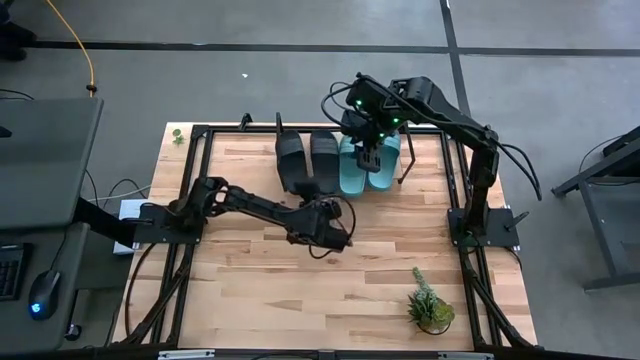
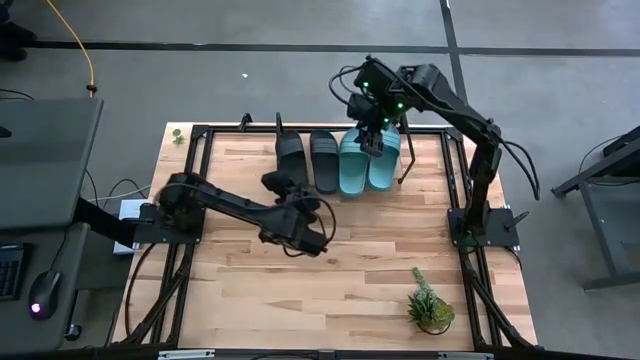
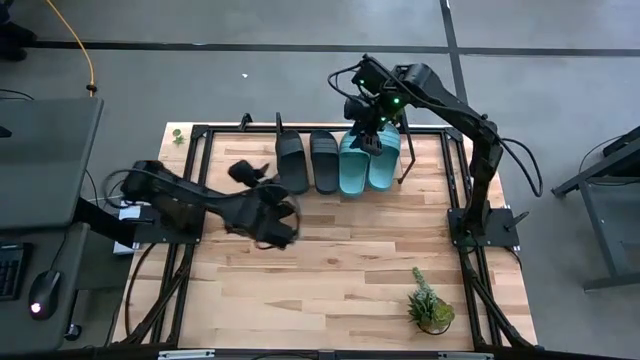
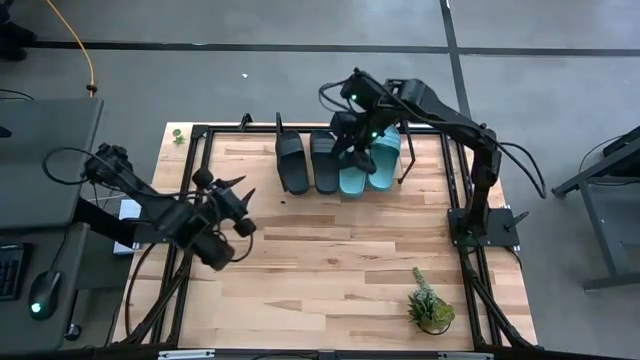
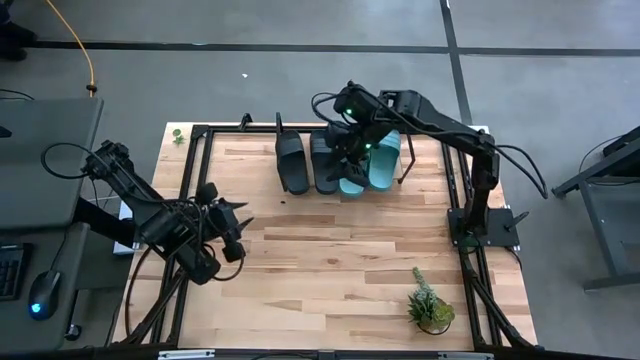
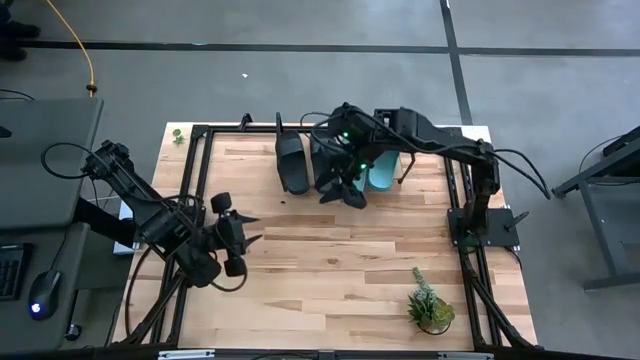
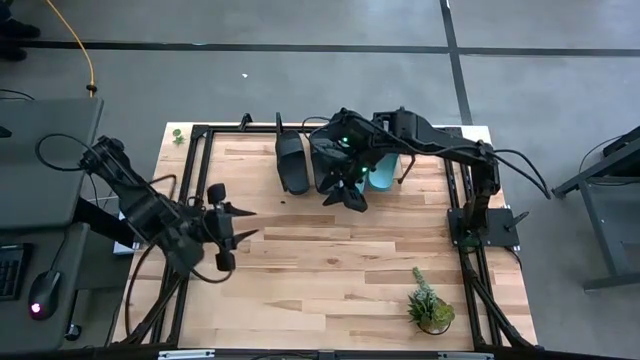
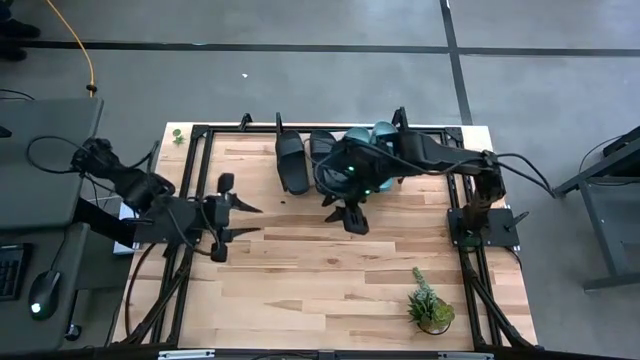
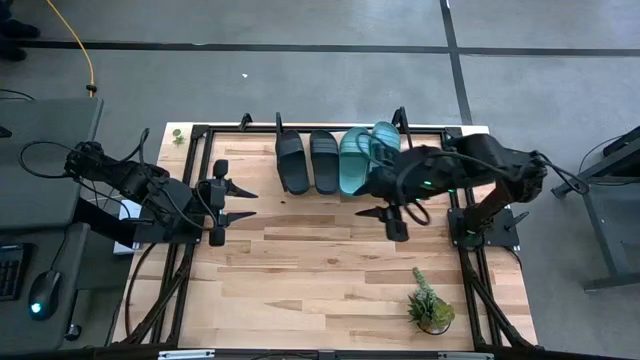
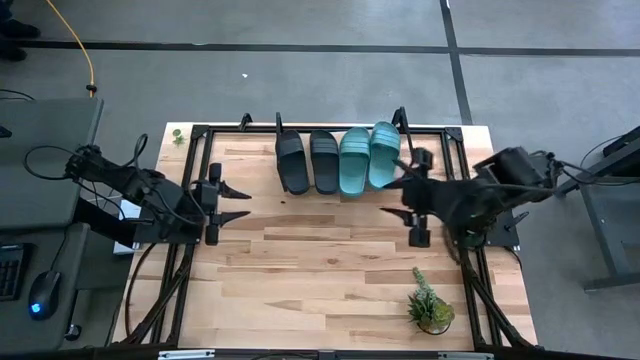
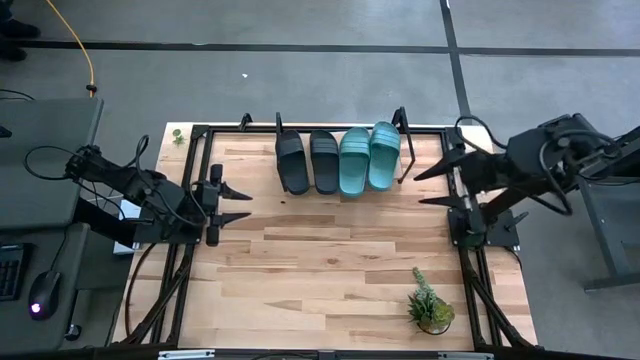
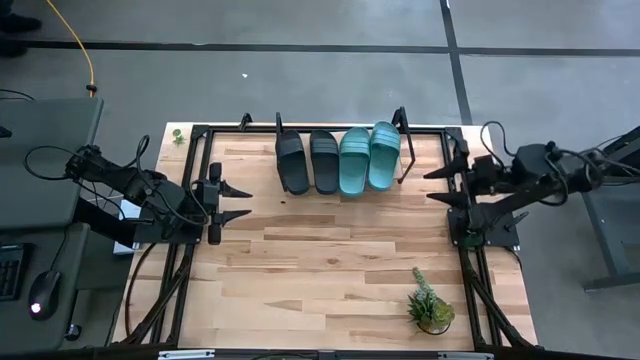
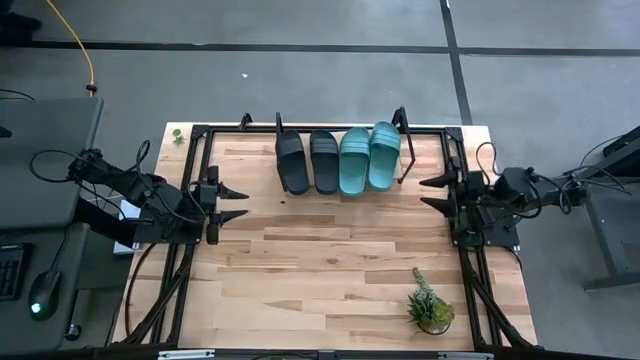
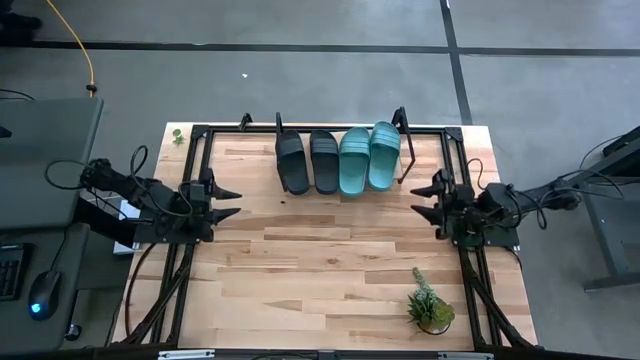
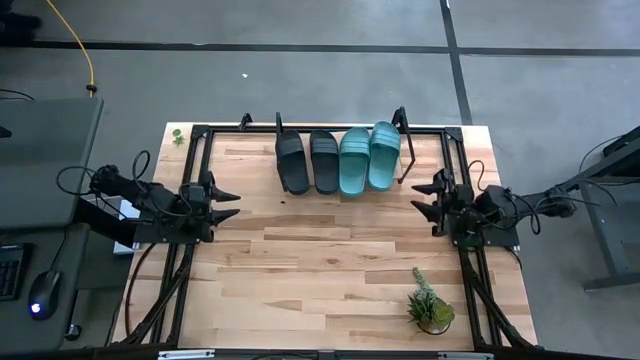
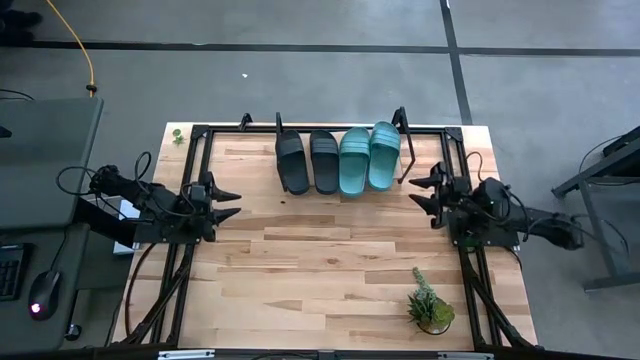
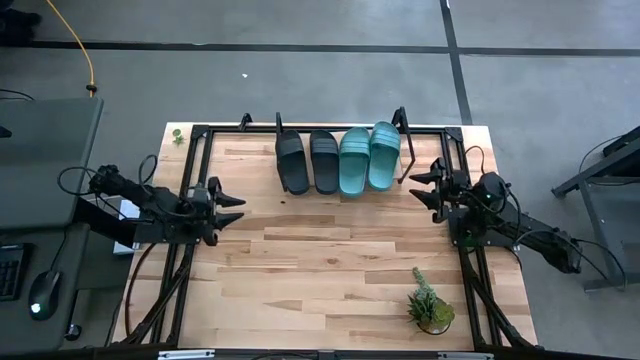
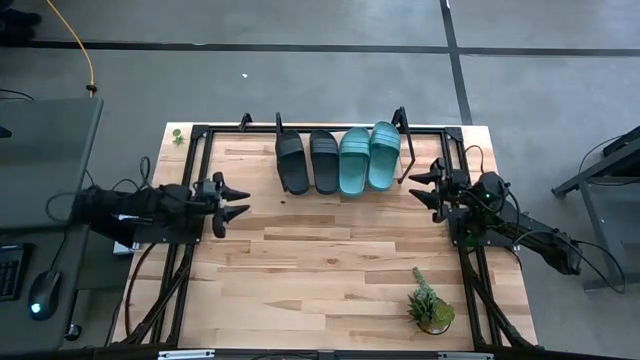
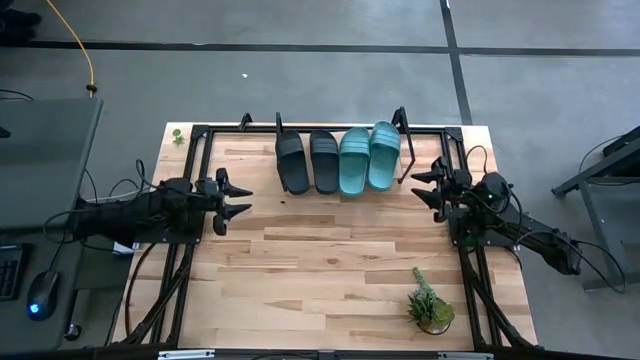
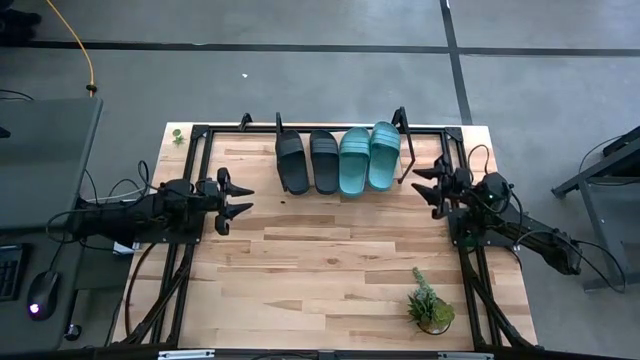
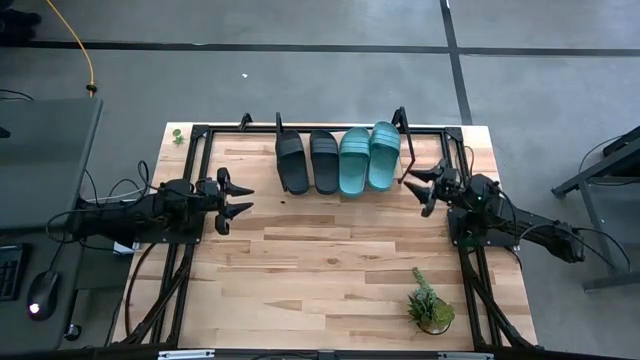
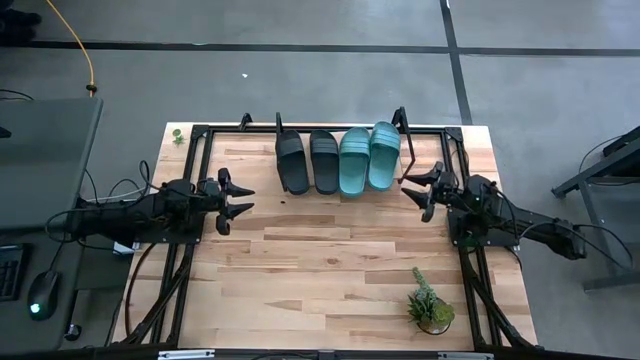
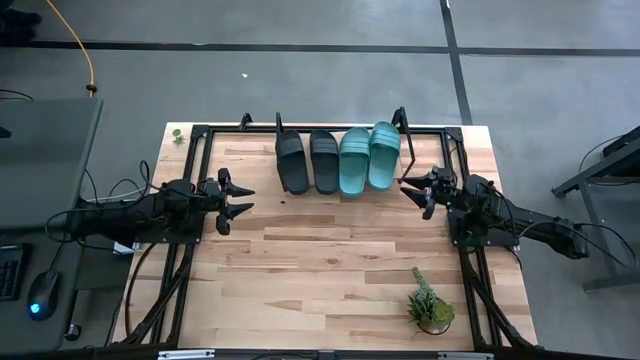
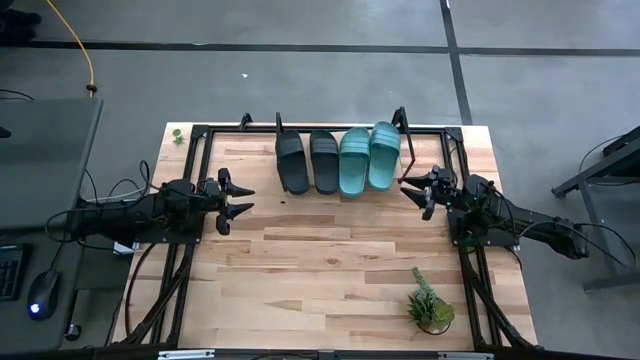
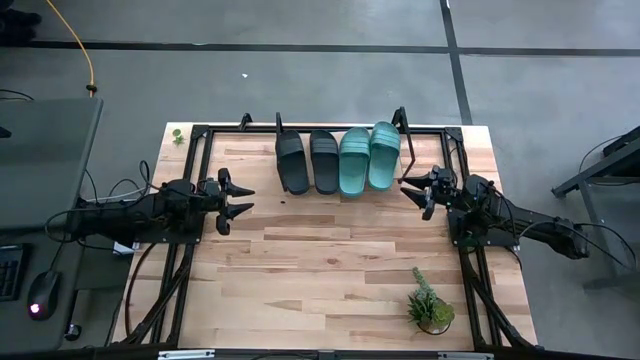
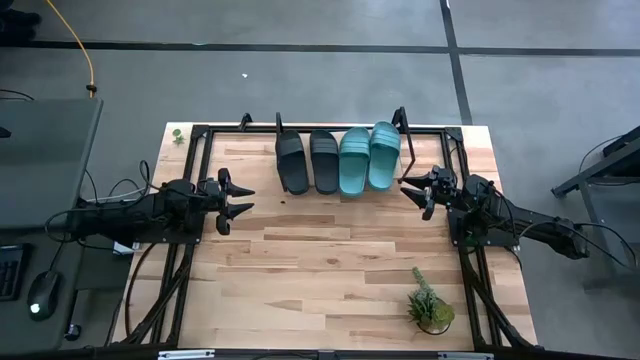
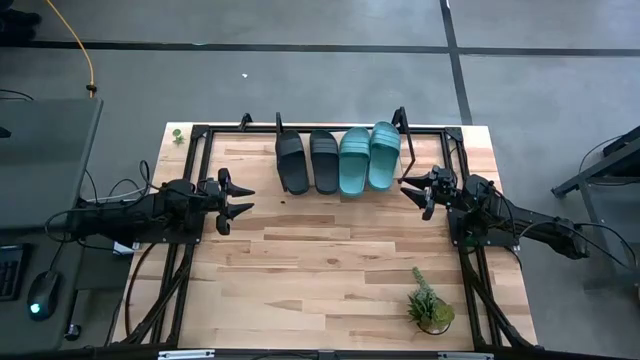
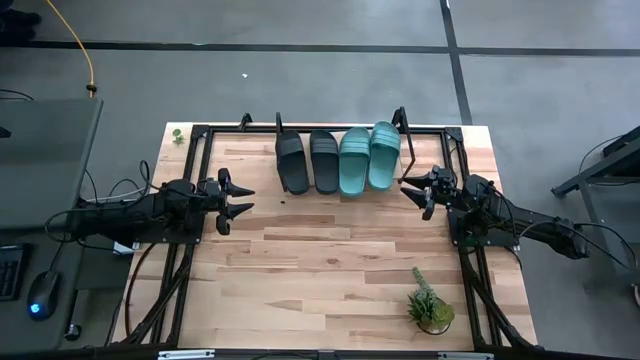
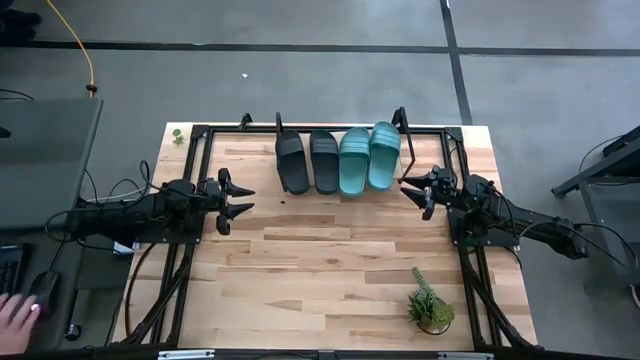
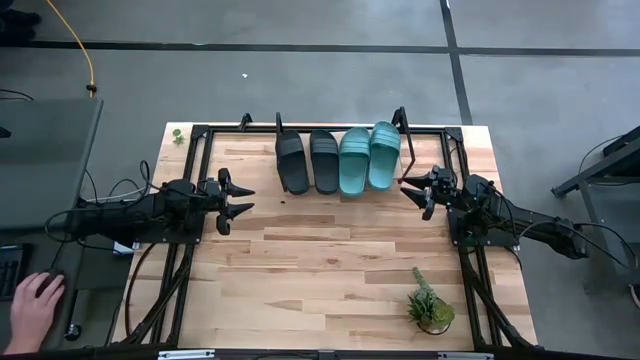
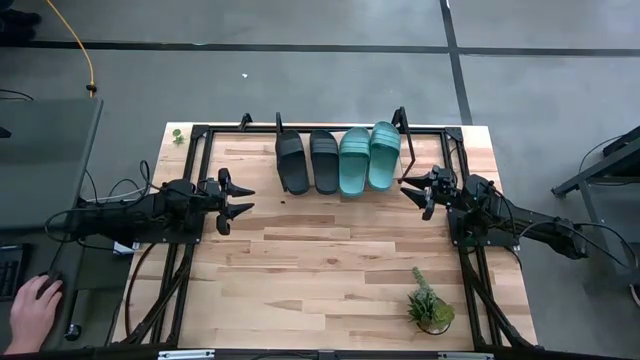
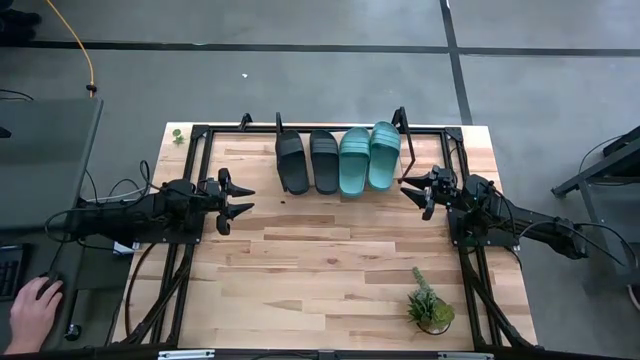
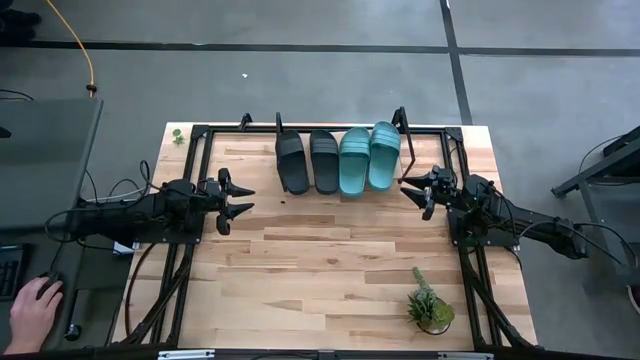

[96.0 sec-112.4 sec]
Task: Pick and place slides into the shelf
Return to Home Position

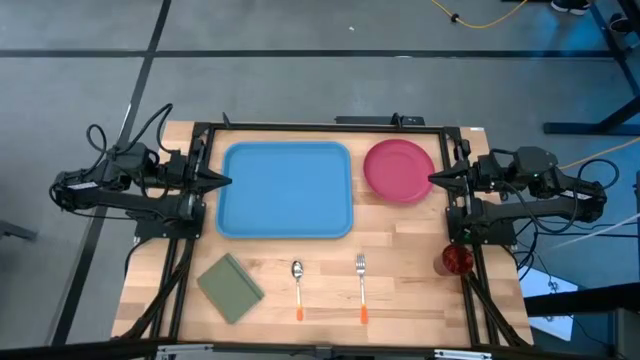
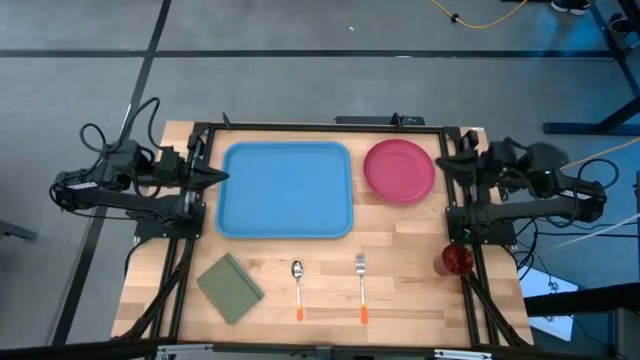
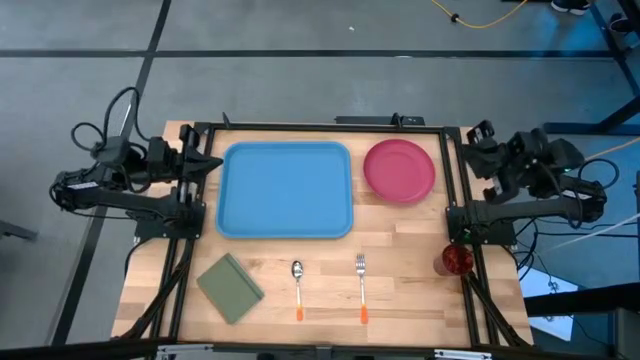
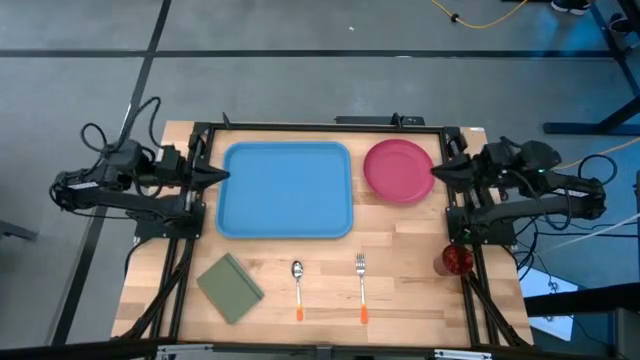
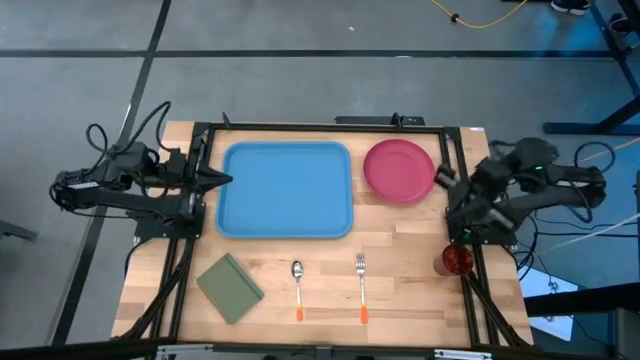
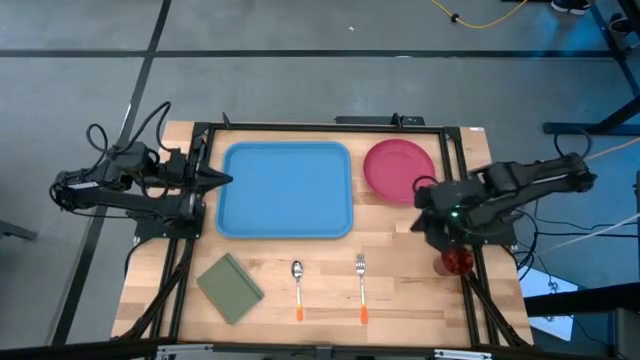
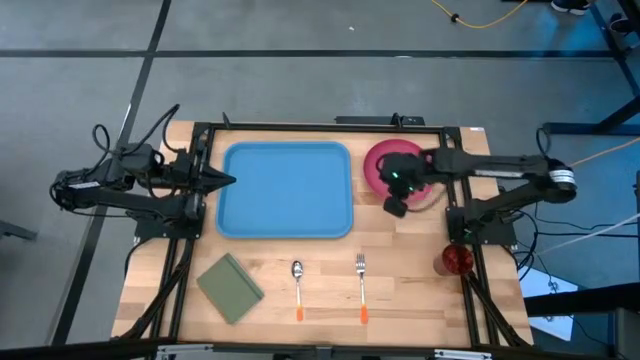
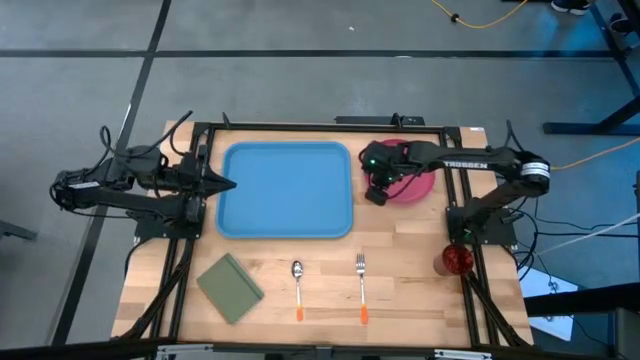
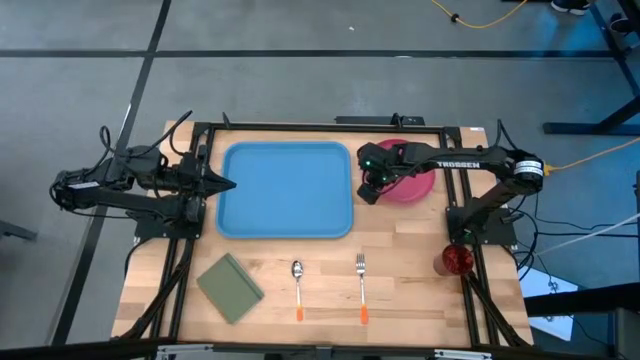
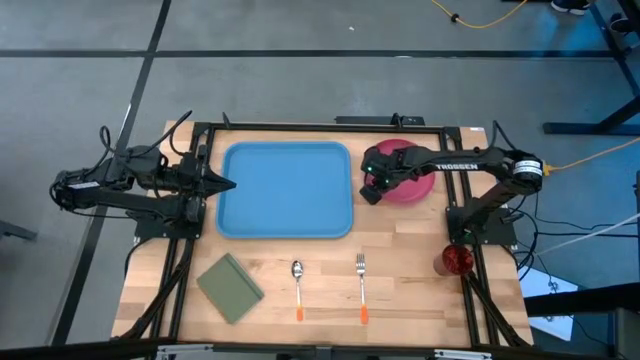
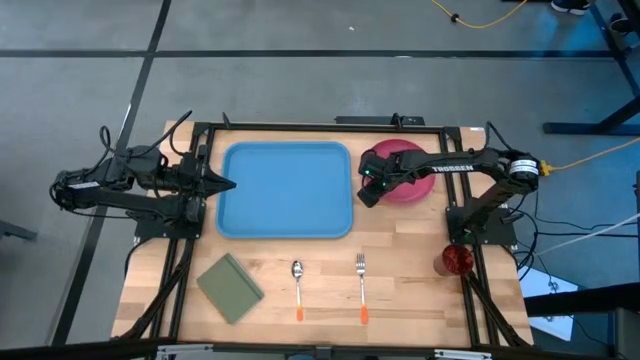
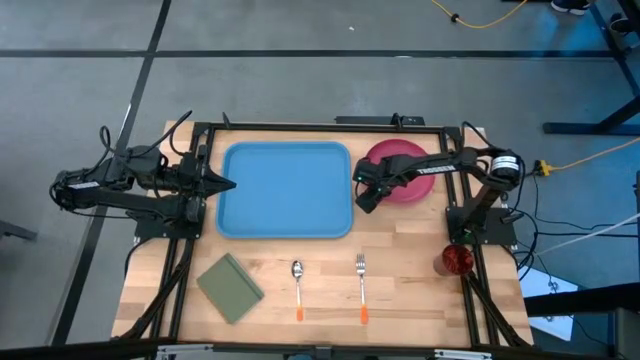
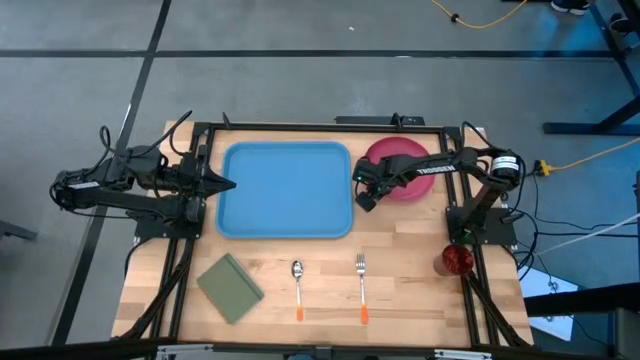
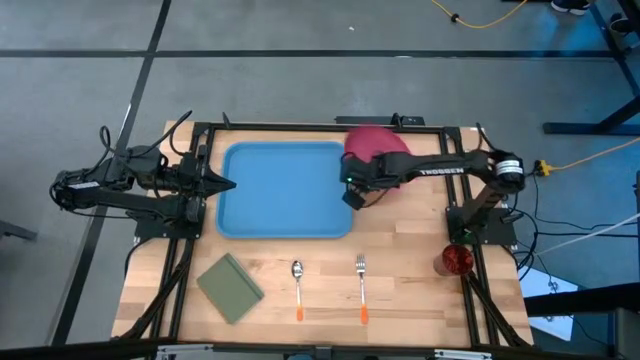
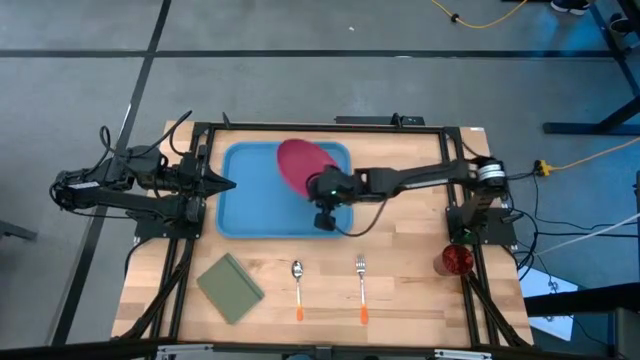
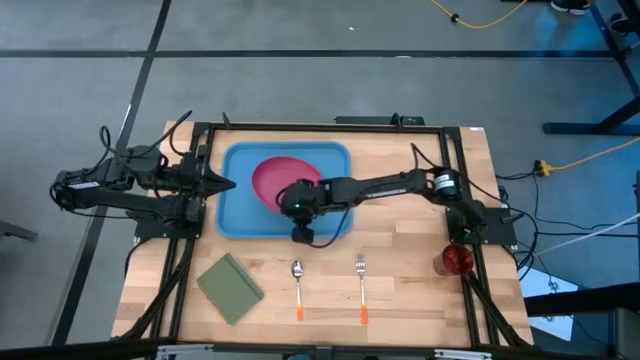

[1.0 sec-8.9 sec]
Task: Pick and place plate/cup/fork/spoon on tray
Put the pink plate into the blue tray
